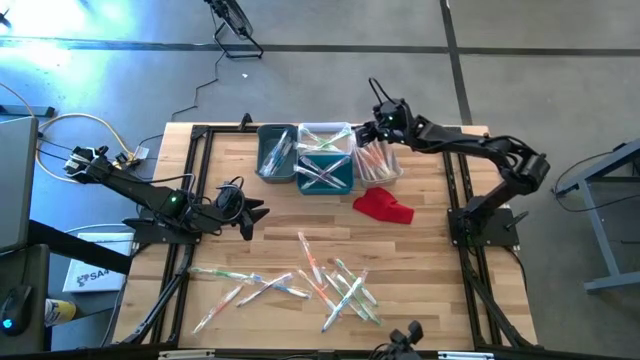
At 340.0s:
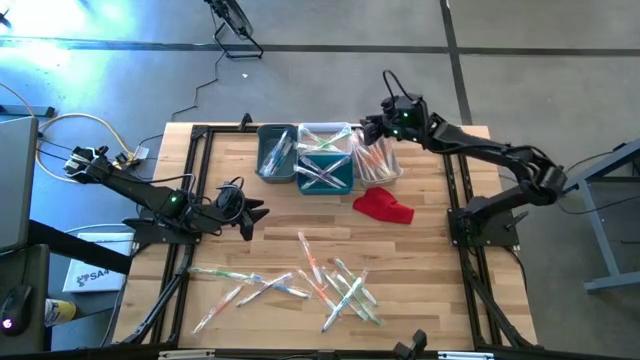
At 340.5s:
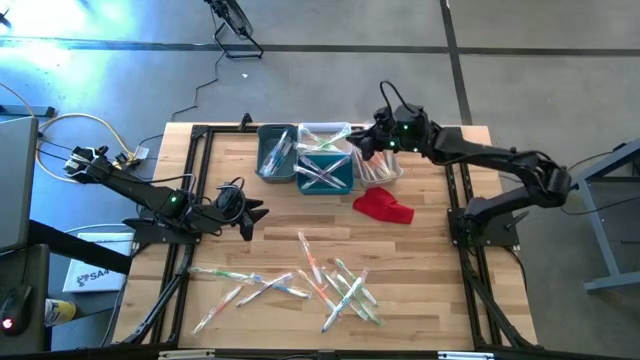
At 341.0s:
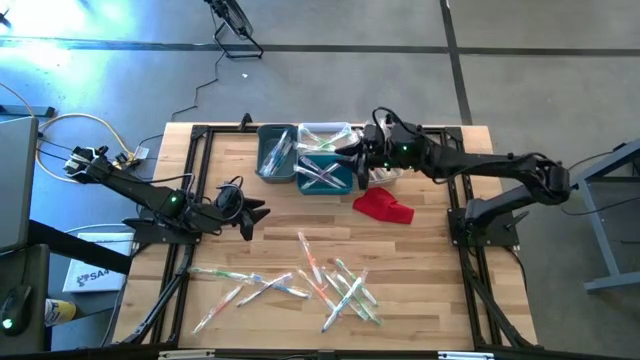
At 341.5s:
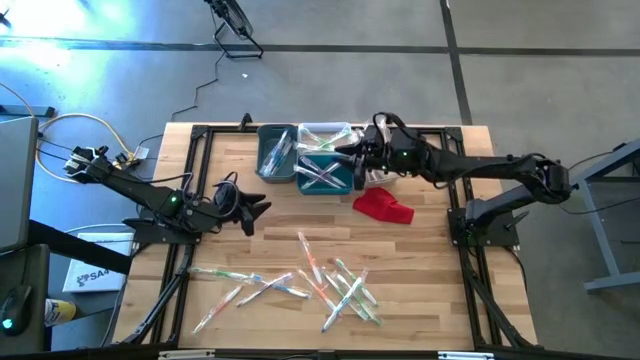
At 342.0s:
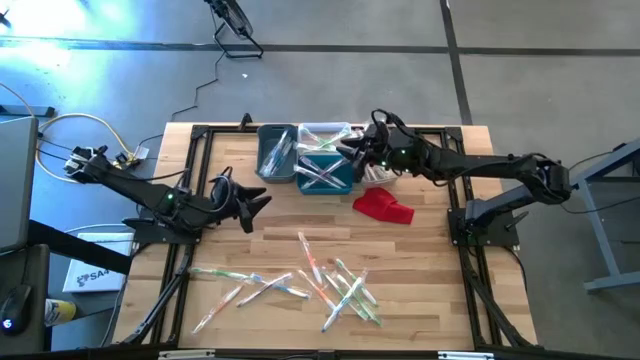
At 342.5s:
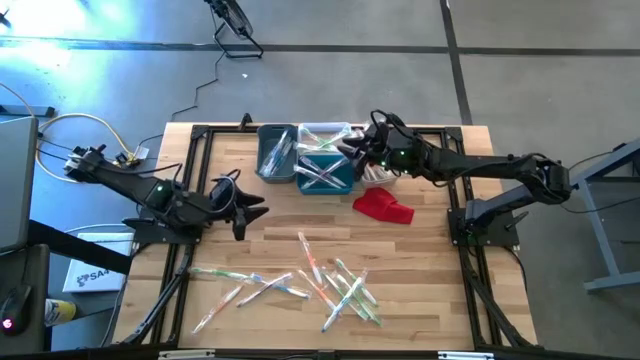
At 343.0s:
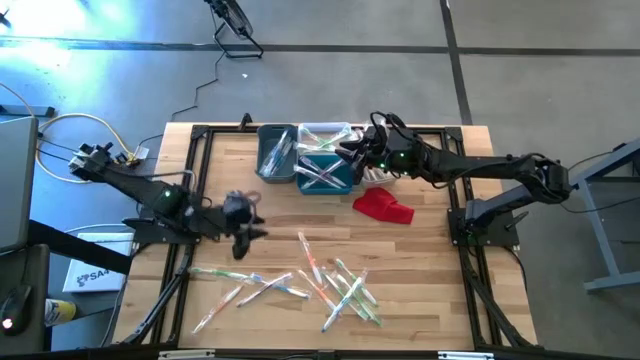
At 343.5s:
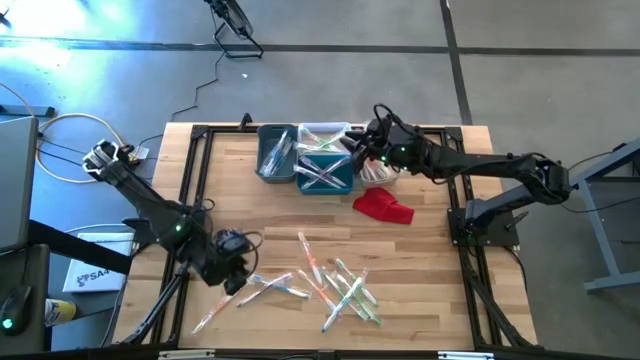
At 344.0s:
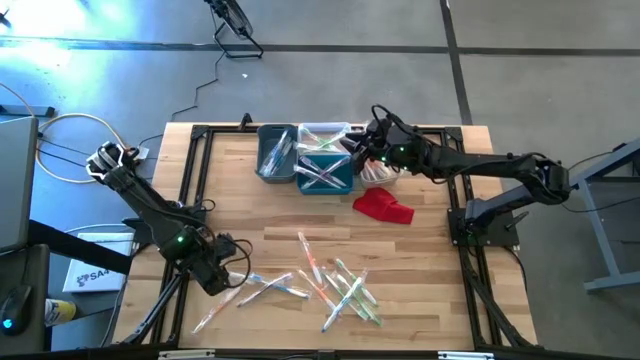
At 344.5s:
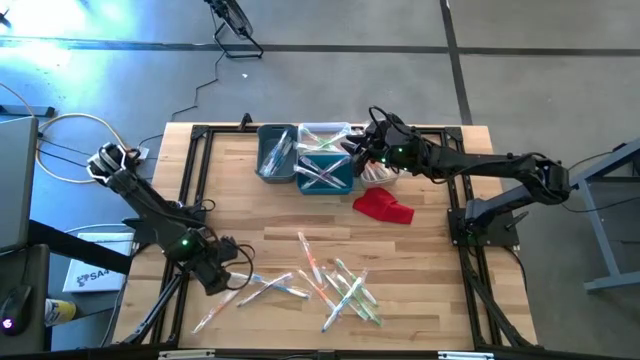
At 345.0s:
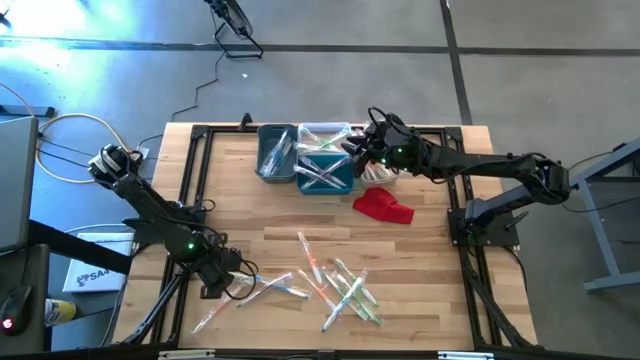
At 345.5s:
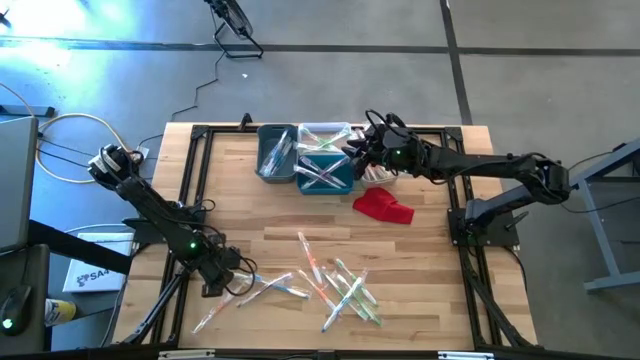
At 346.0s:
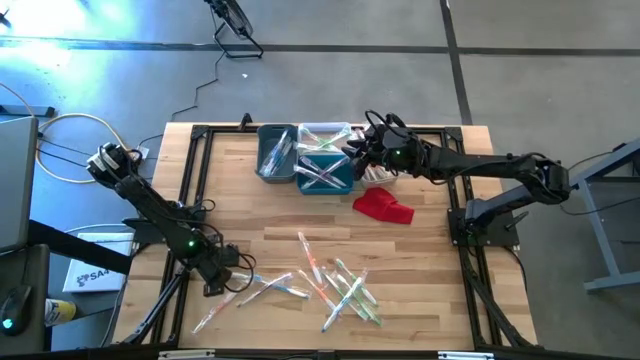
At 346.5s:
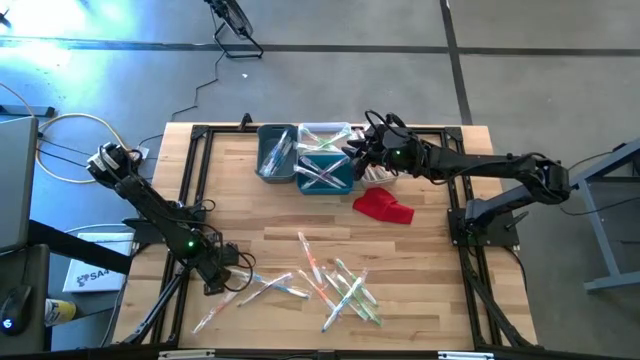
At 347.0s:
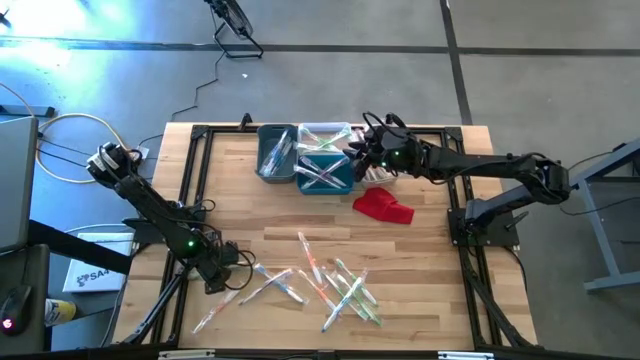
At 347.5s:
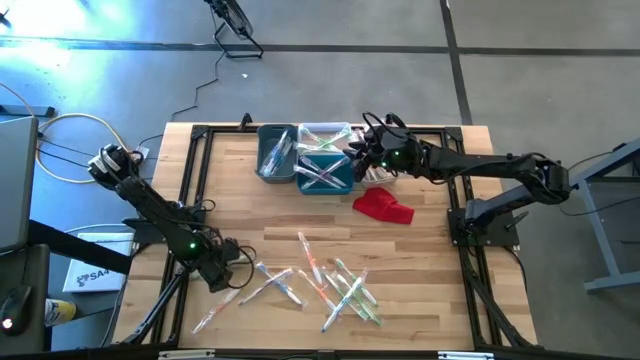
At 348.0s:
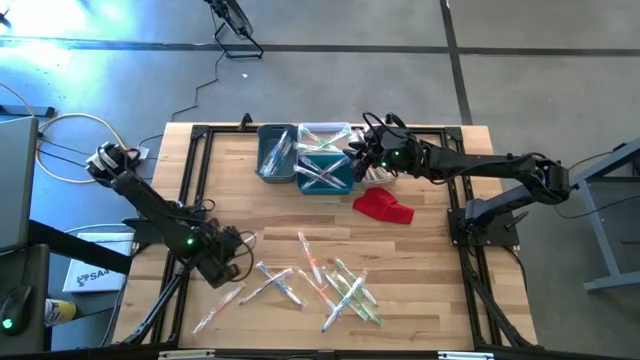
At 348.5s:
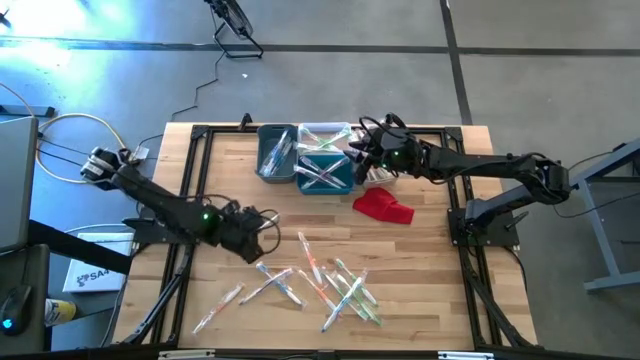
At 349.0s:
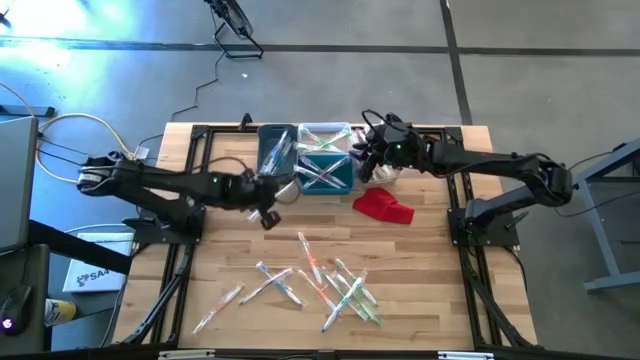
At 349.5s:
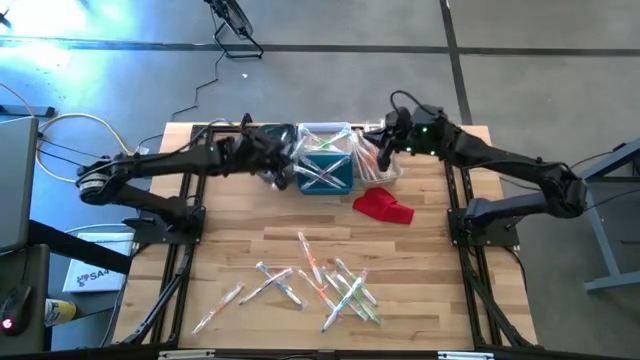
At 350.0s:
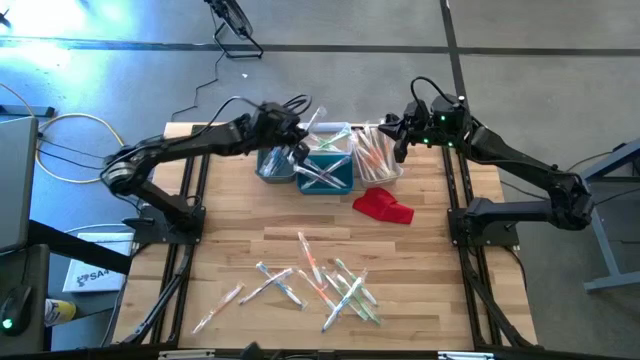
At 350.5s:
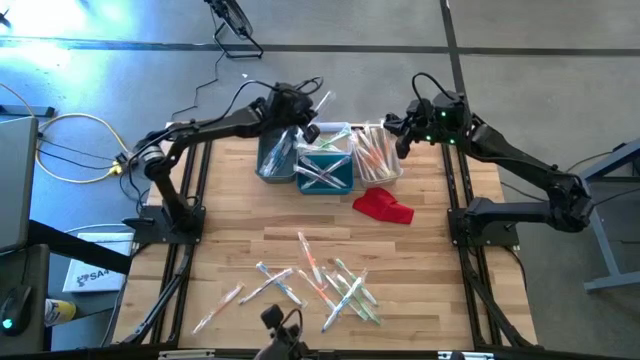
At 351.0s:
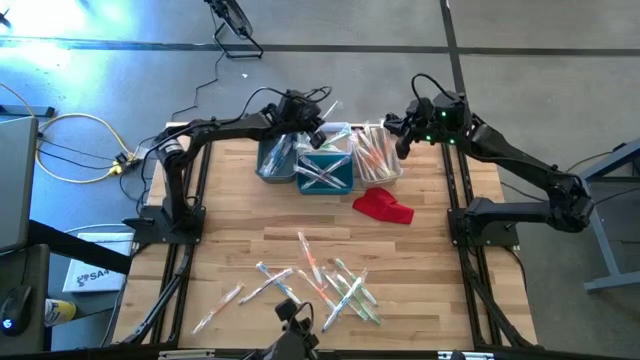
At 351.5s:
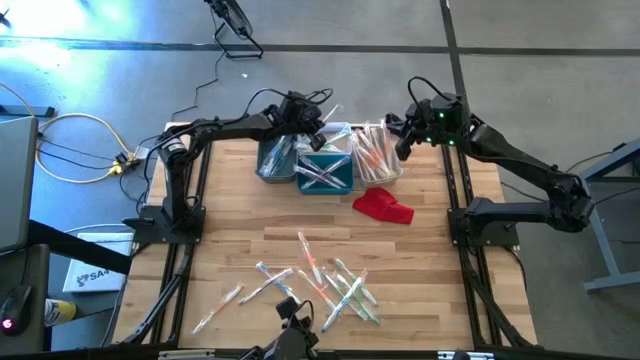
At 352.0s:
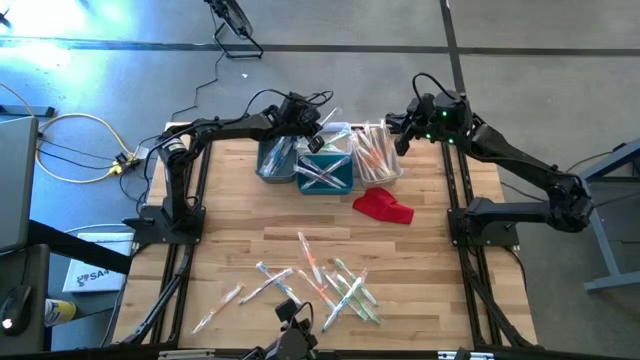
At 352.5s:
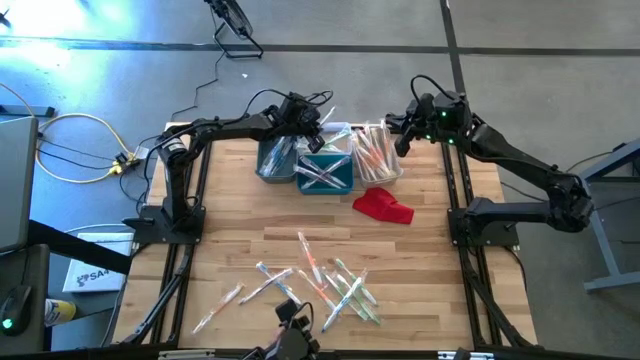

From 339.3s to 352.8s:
Task: Pick & Place Toothbrushes
Put the green toothbrush into the transparent bin

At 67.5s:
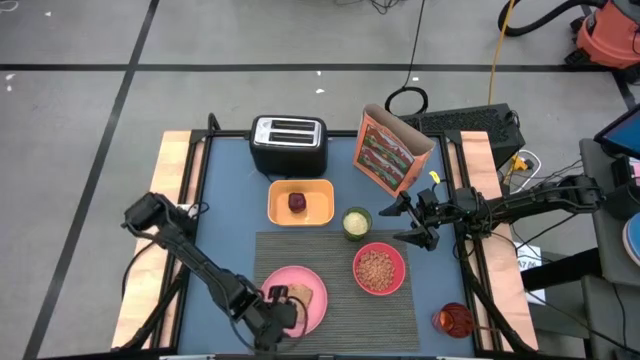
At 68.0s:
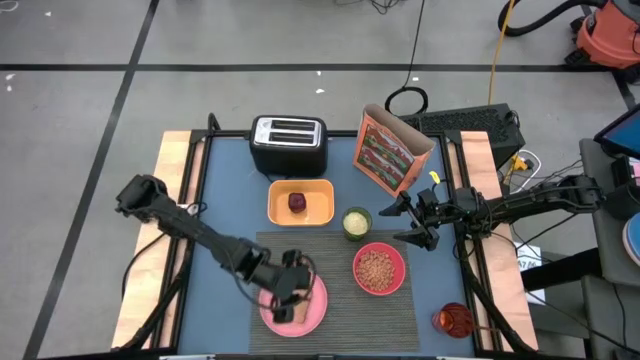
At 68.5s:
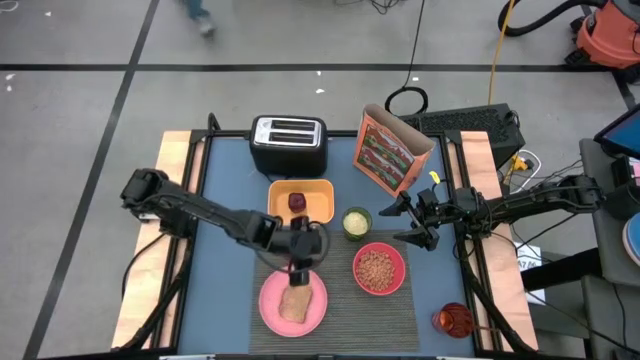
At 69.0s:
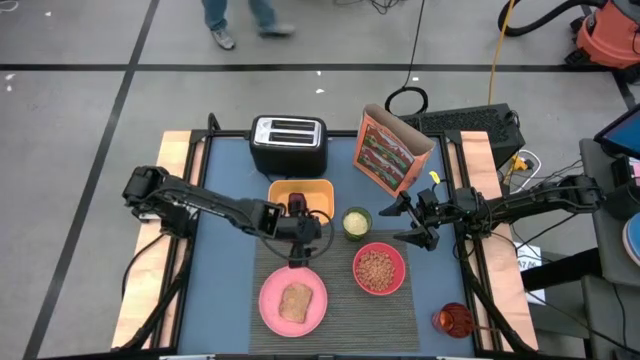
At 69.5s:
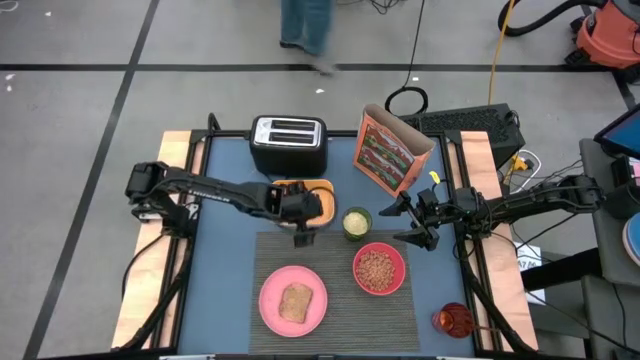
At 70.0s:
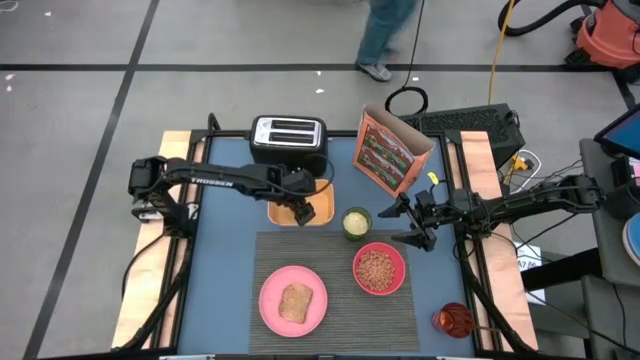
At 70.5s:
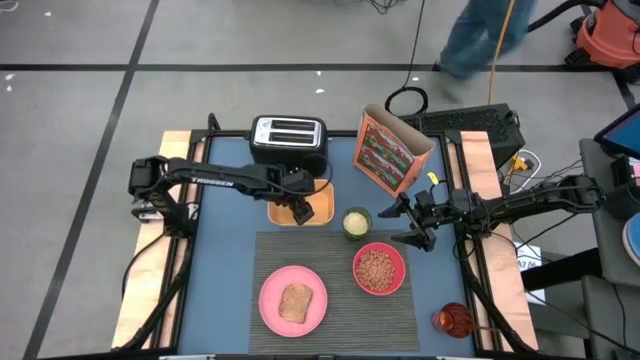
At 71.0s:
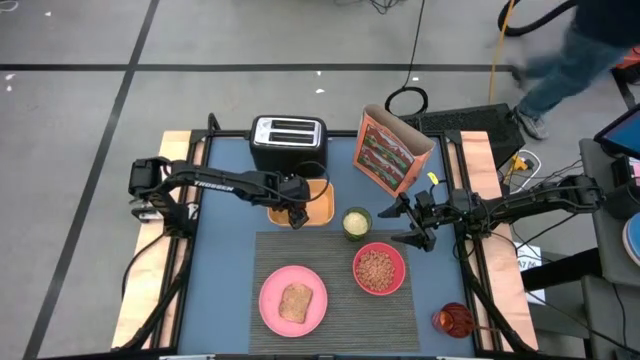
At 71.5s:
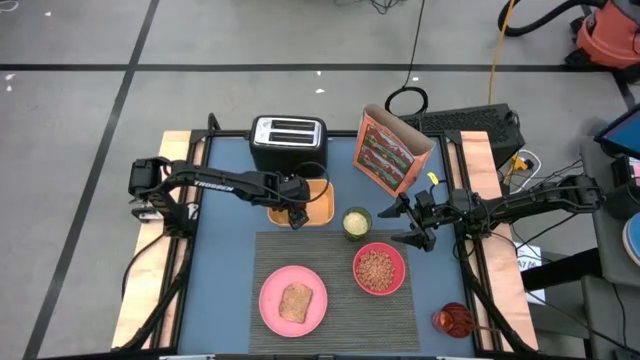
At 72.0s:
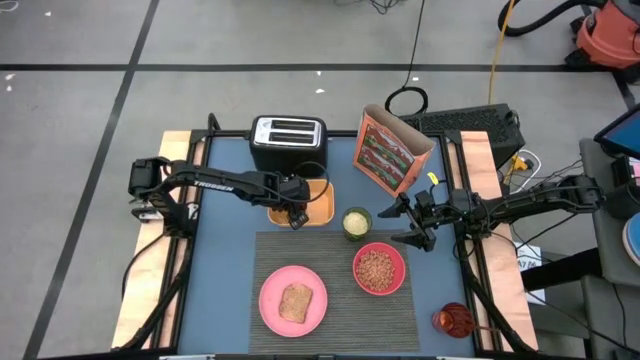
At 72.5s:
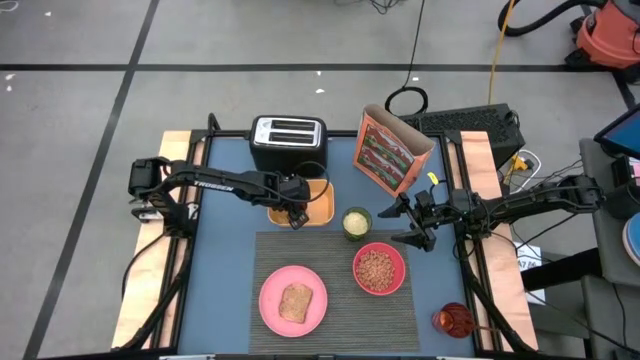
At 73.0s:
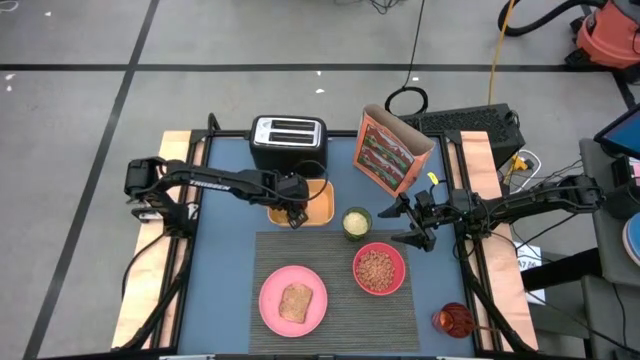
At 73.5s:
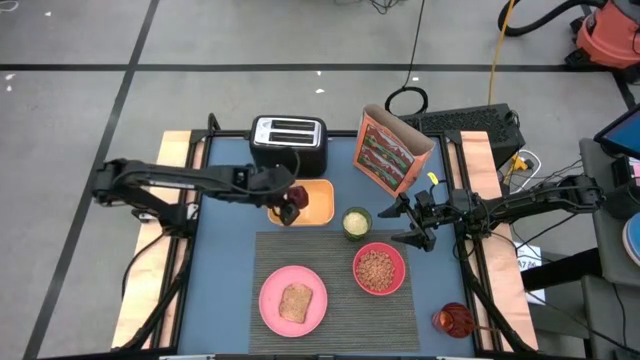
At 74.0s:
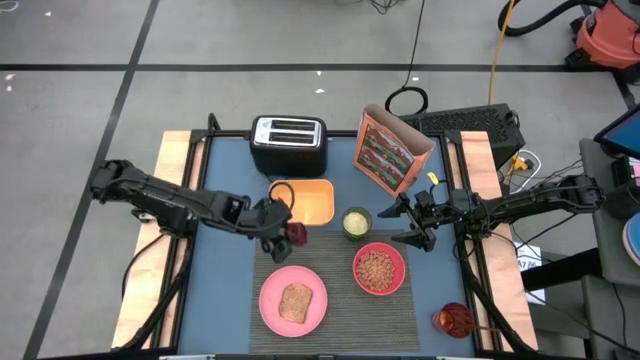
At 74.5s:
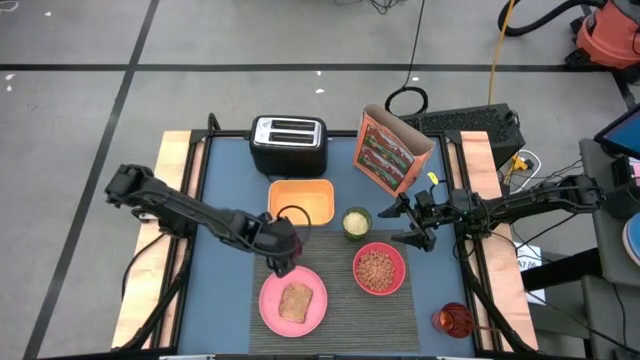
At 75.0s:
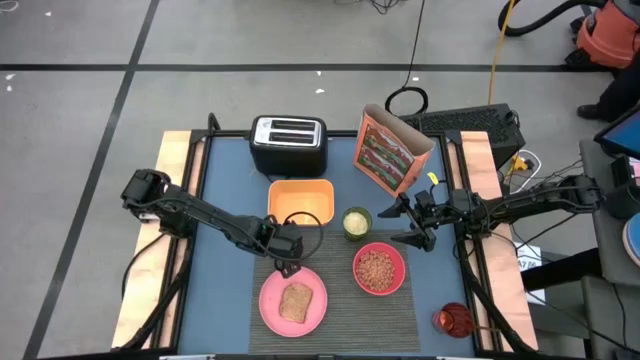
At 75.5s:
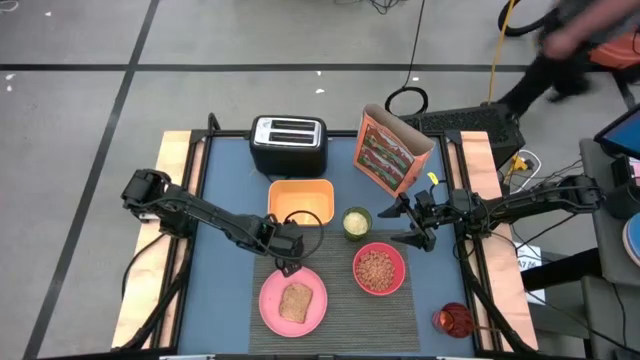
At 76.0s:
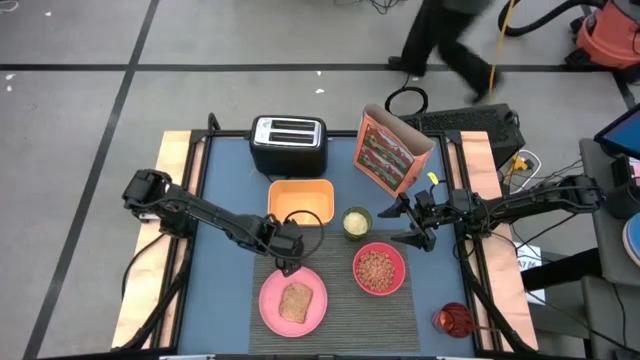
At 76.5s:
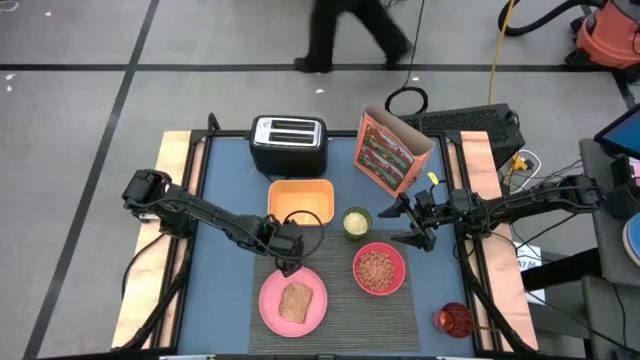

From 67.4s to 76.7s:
Task: Arrange a breakfast setting
Put the red apple on the gray table mat to the top of the pink plate
